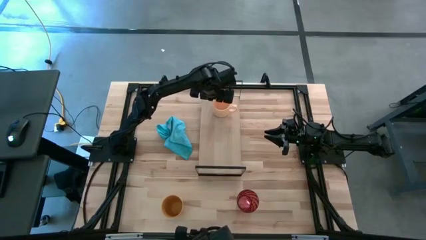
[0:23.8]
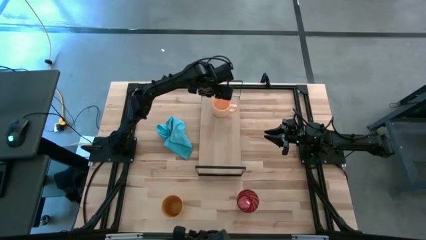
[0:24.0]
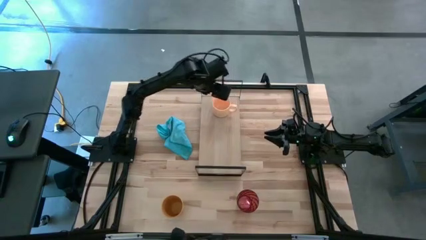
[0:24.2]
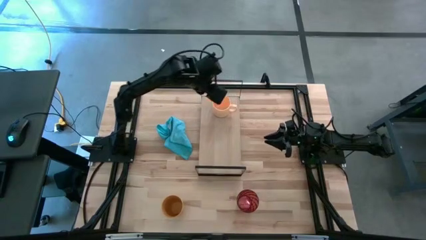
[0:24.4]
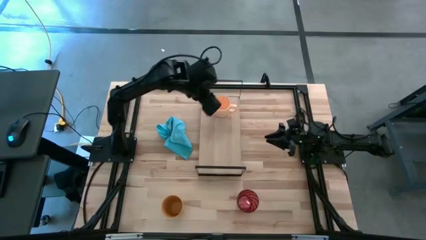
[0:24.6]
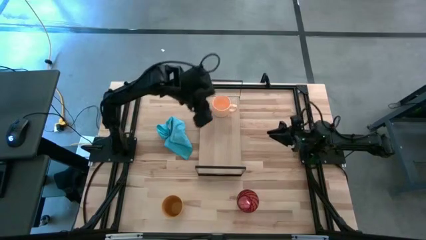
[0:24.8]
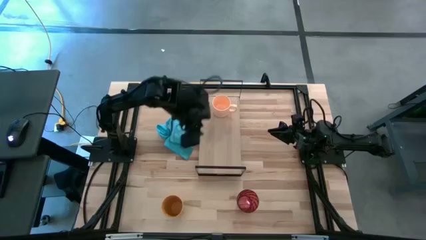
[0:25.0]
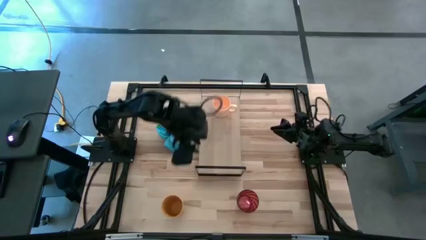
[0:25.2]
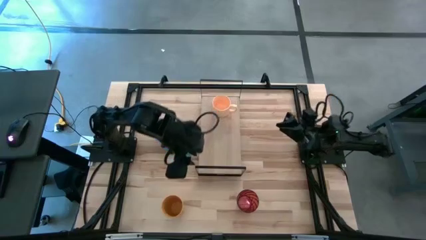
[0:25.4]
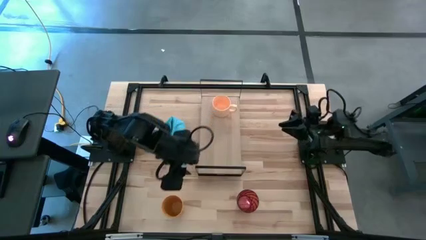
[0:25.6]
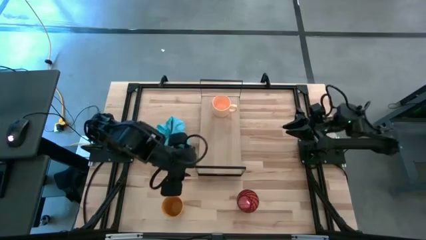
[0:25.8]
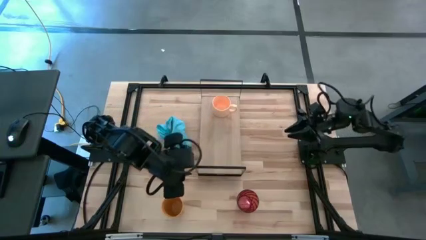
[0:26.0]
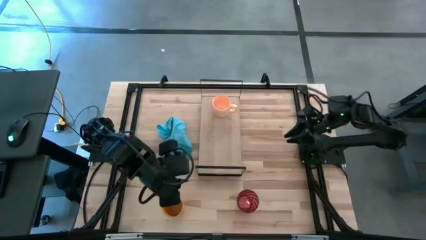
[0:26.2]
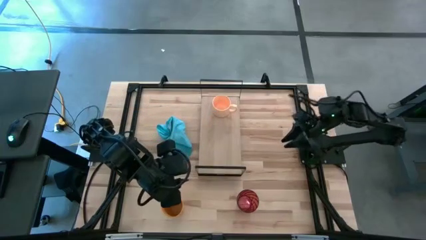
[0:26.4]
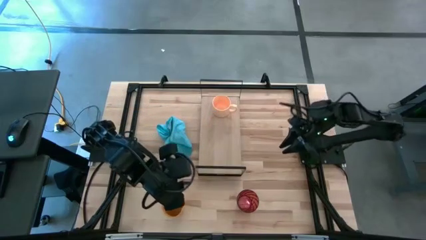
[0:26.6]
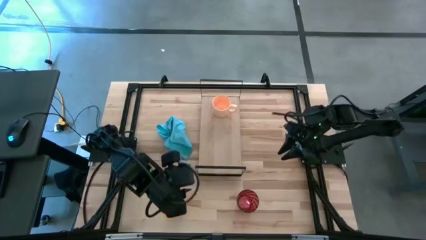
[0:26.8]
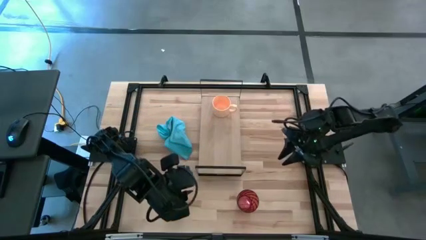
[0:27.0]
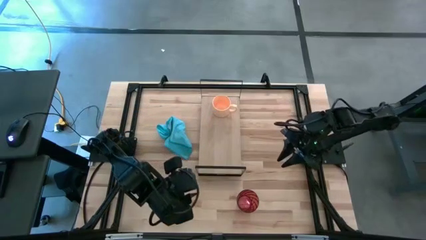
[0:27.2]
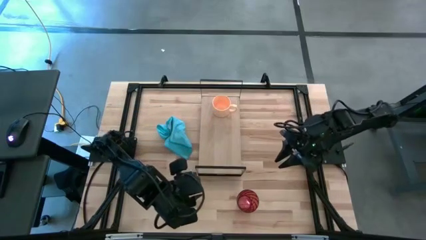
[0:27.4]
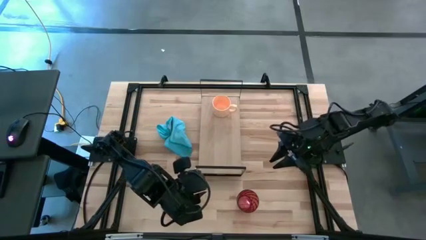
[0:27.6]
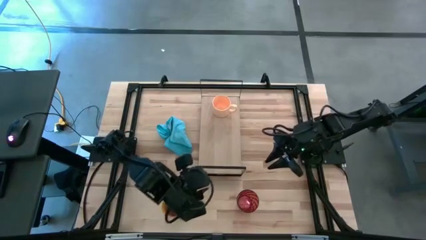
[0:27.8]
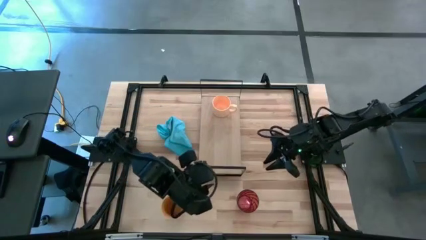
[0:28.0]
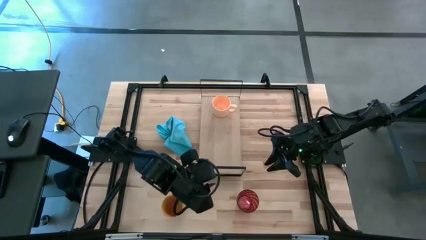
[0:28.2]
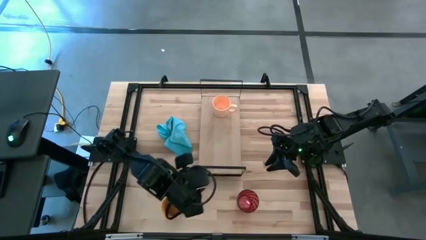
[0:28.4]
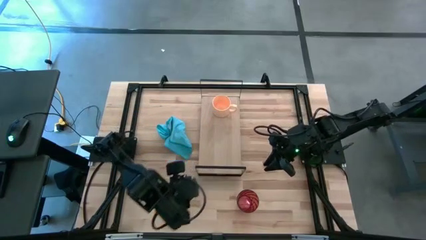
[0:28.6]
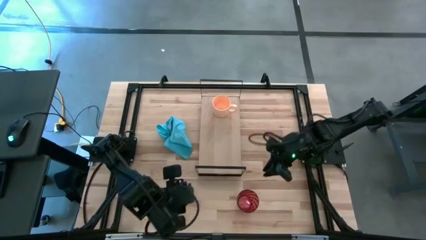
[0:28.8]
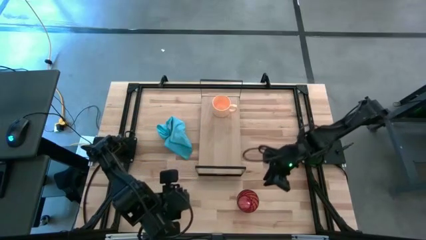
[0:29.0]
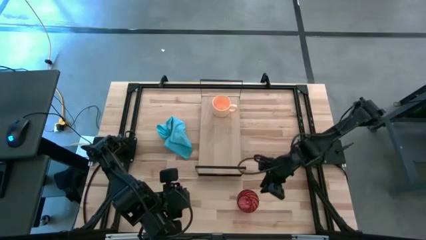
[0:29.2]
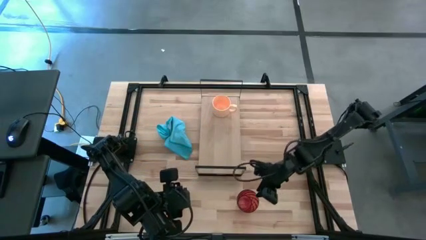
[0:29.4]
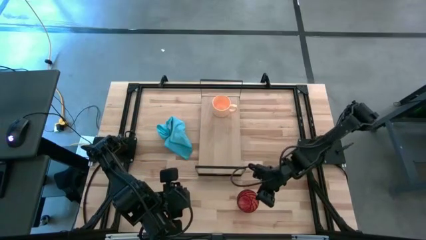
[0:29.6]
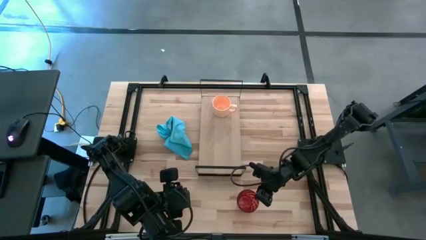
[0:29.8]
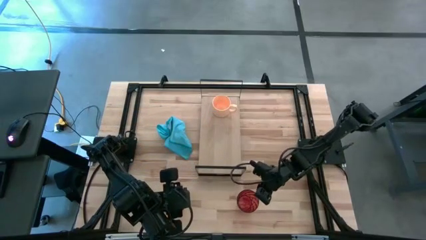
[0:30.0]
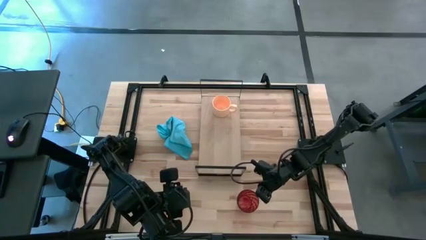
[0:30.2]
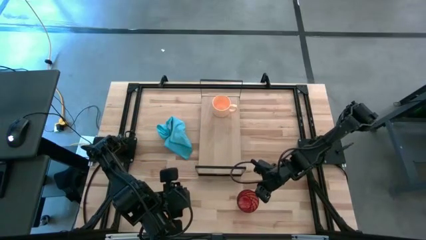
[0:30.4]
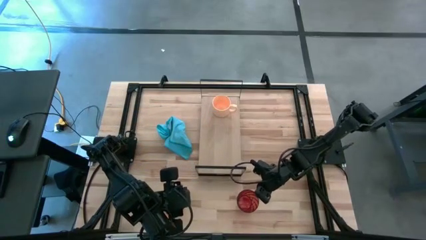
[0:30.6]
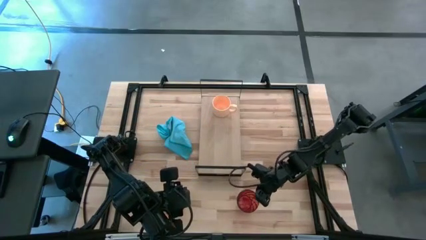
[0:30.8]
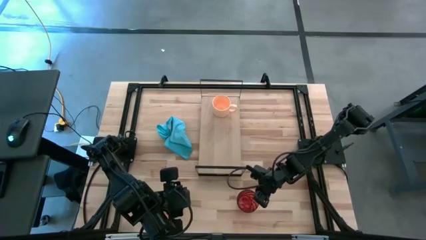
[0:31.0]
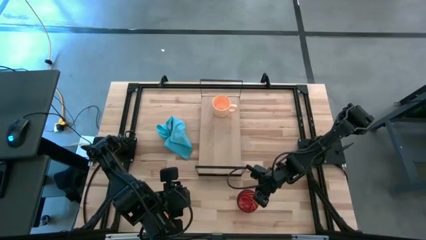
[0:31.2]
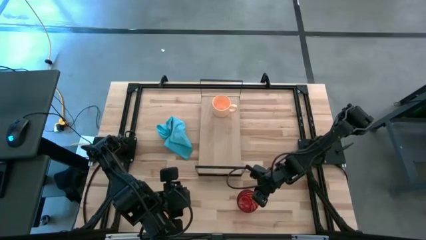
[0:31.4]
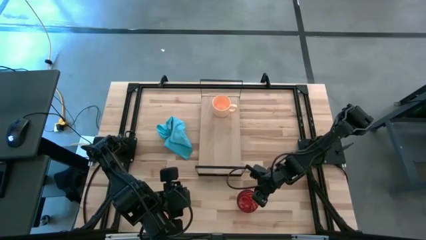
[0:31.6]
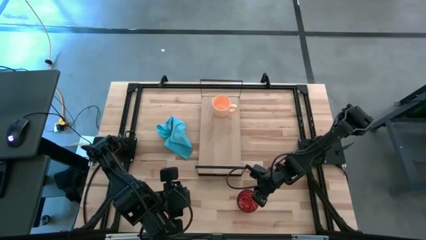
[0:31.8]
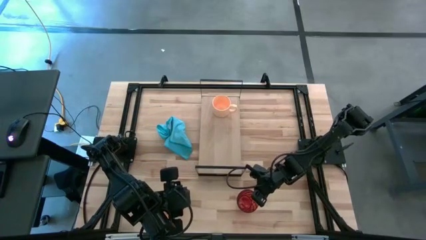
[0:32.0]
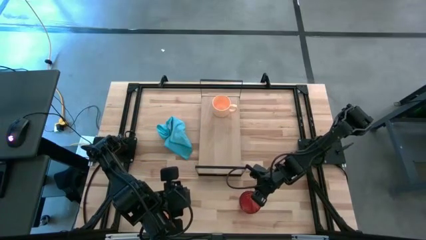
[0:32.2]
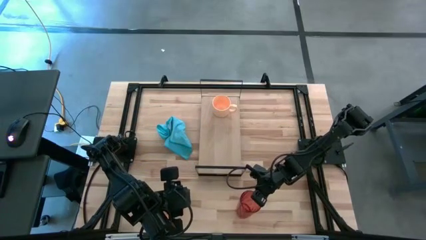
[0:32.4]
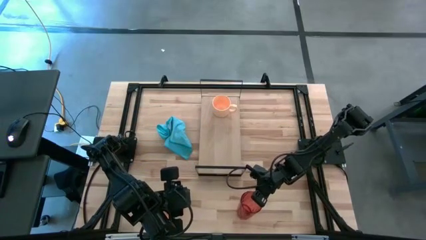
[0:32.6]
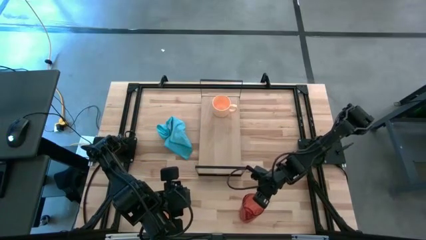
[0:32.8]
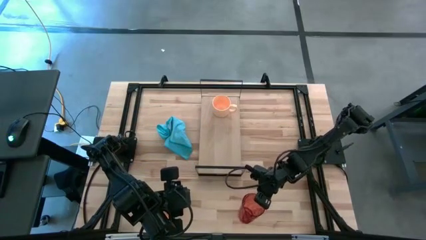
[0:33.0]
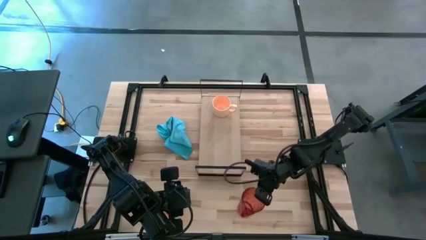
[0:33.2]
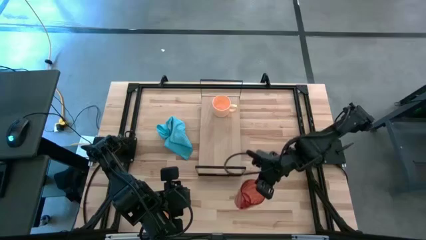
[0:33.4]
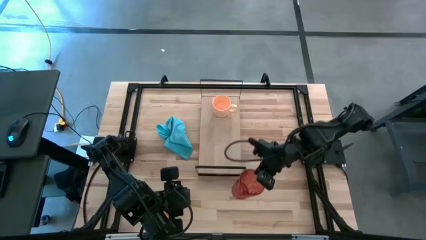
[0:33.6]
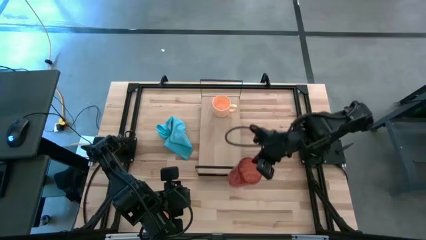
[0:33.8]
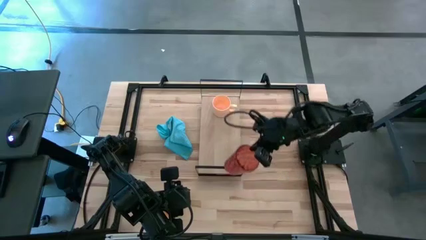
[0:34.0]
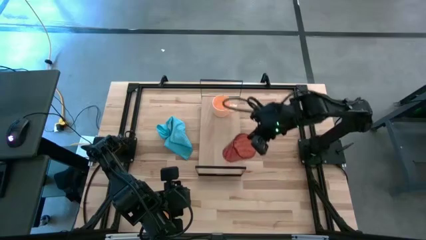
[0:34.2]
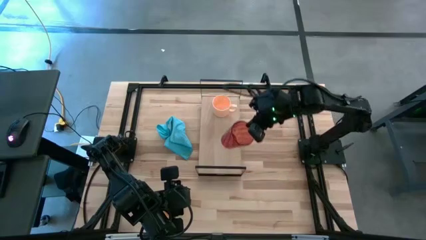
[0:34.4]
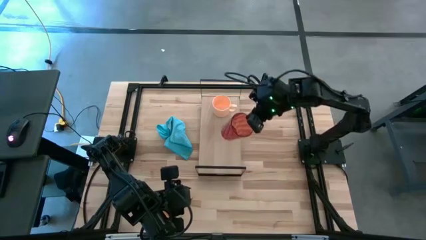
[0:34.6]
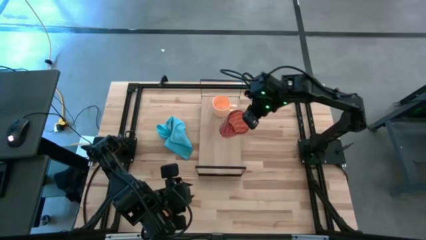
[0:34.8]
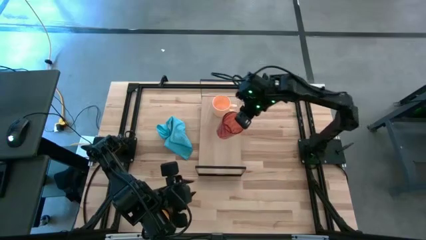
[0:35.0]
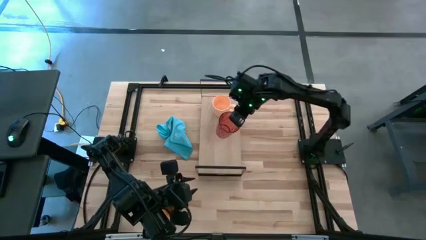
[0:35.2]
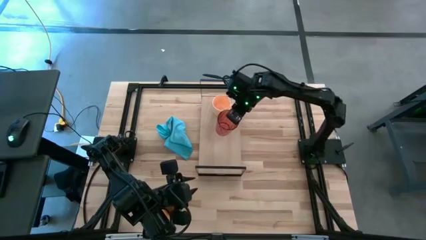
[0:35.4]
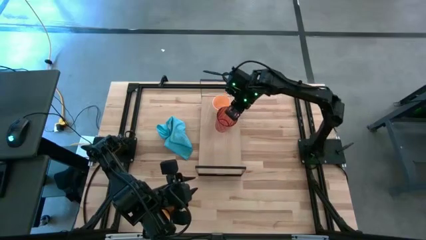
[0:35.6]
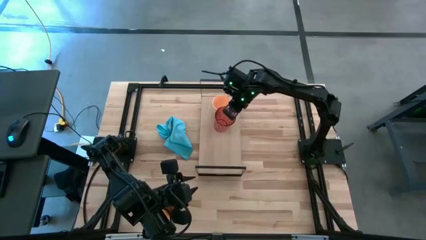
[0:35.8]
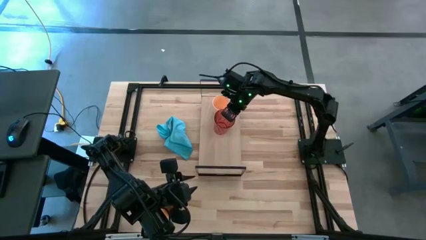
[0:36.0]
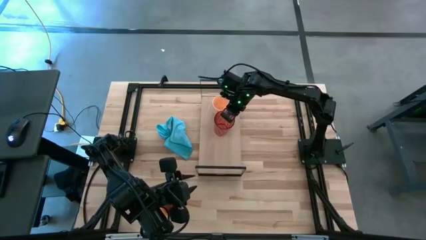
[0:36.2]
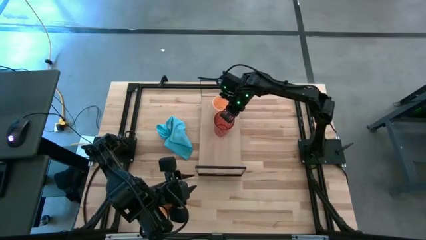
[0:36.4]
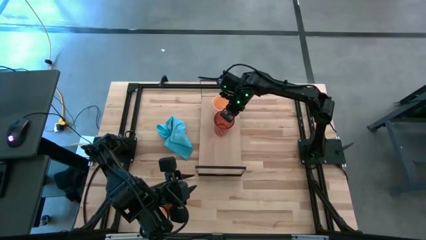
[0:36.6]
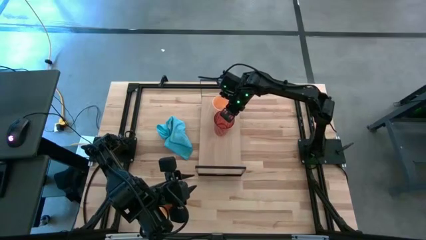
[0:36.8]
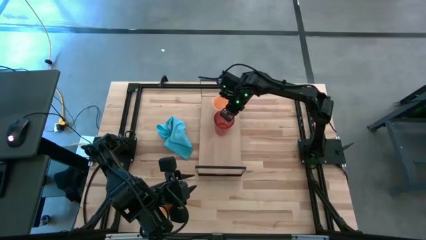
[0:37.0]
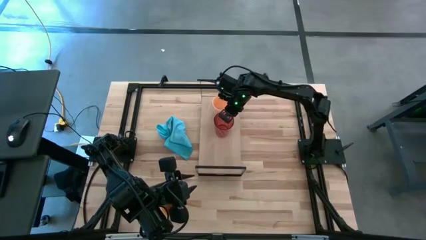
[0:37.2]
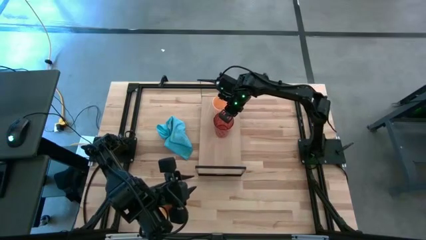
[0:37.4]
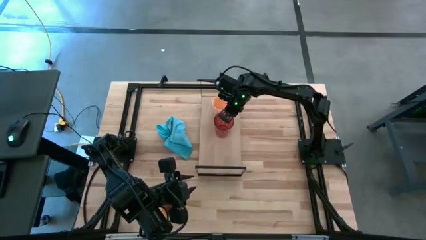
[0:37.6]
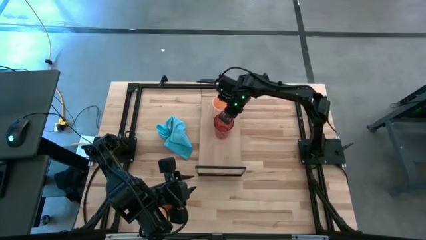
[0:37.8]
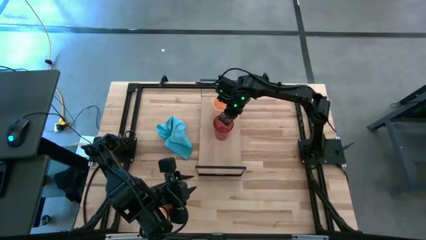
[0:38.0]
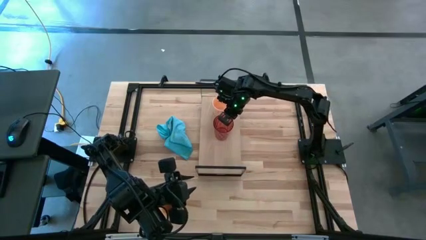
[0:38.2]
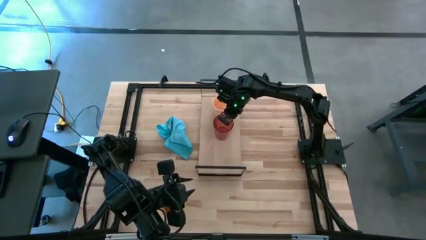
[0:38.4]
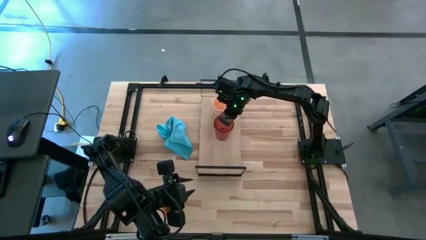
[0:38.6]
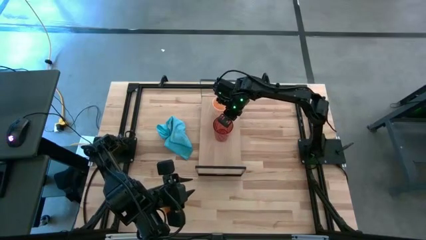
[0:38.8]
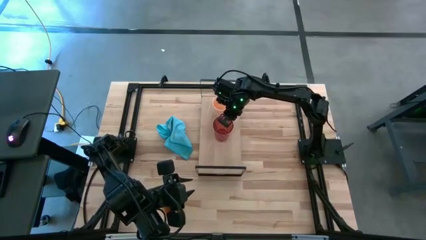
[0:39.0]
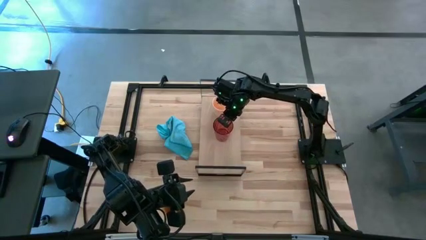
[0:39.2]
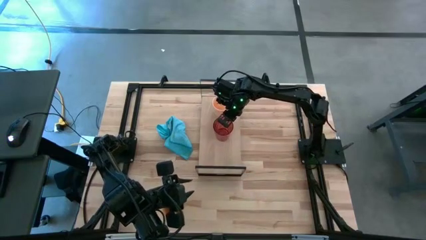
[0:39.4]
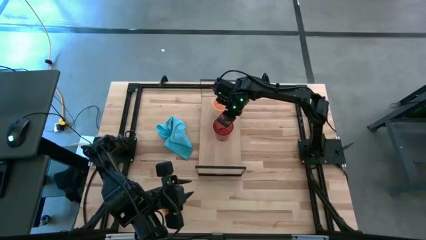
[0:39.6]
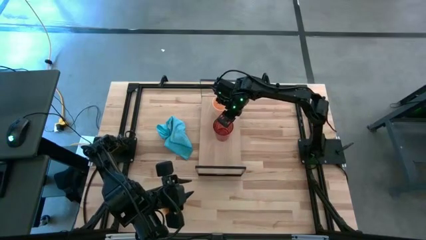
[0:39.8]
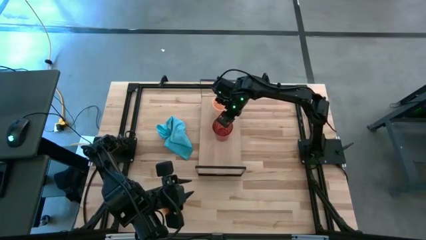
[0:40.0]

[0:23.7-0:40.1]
Task: Stack small to large cups/mugs on shelf
Put the red cup on the shelf
